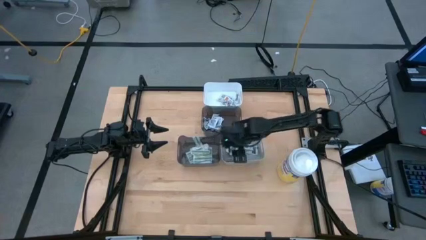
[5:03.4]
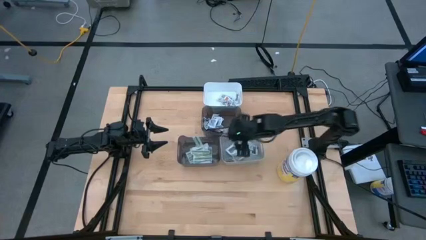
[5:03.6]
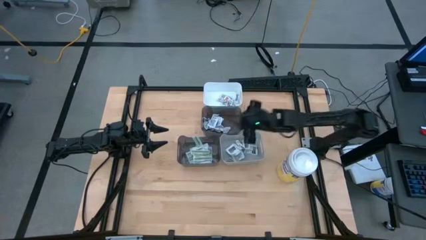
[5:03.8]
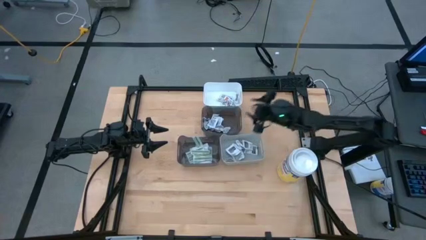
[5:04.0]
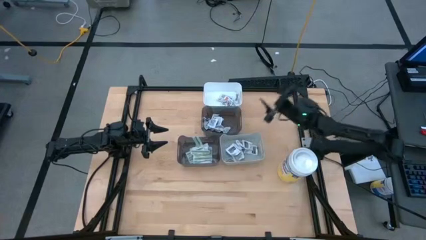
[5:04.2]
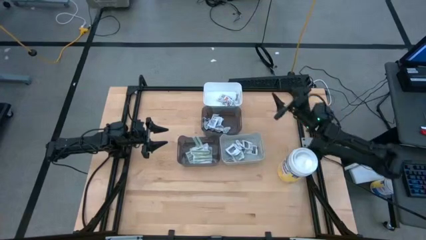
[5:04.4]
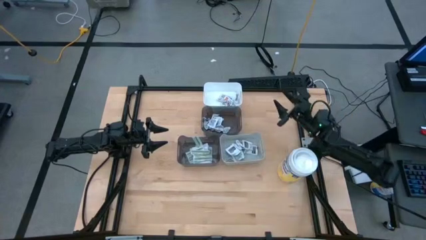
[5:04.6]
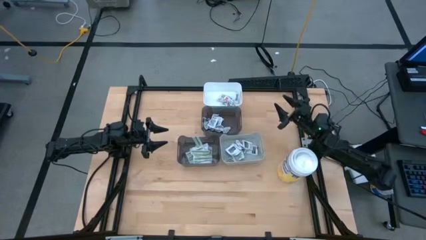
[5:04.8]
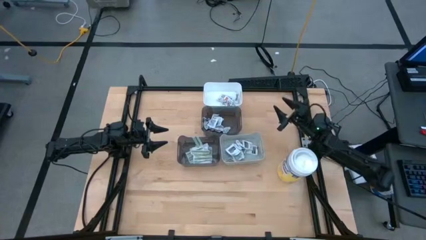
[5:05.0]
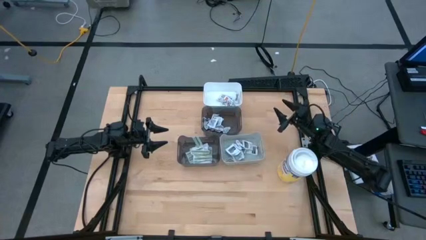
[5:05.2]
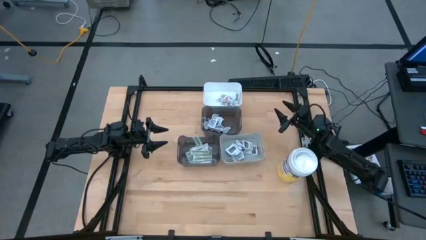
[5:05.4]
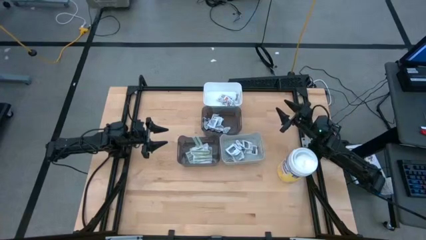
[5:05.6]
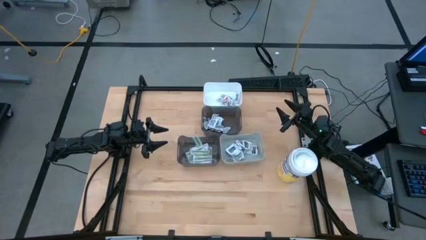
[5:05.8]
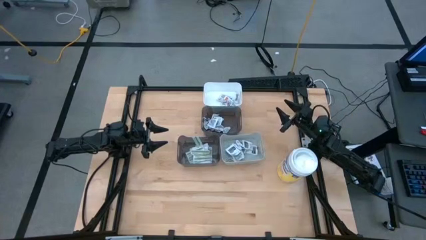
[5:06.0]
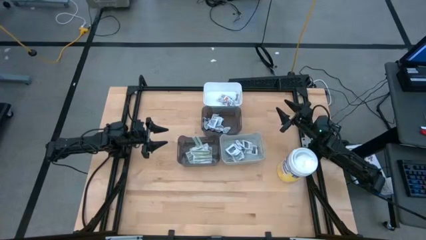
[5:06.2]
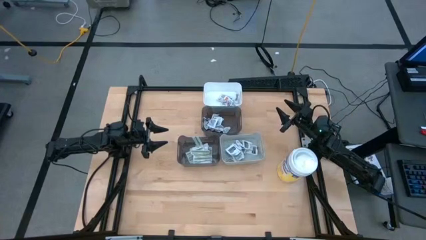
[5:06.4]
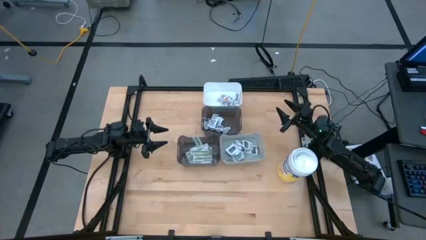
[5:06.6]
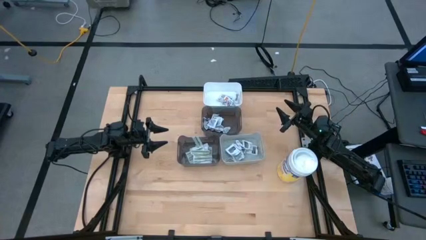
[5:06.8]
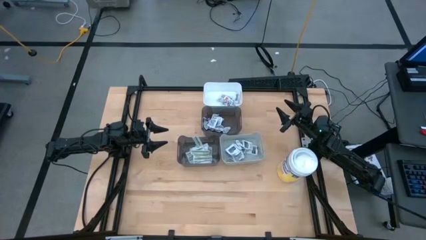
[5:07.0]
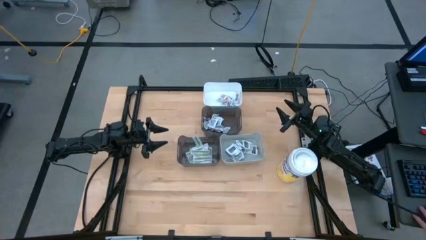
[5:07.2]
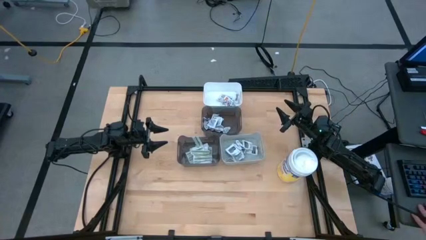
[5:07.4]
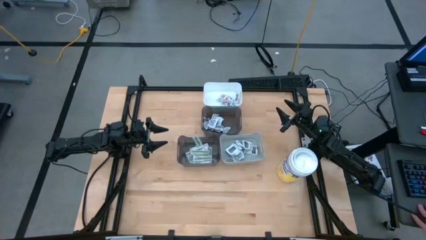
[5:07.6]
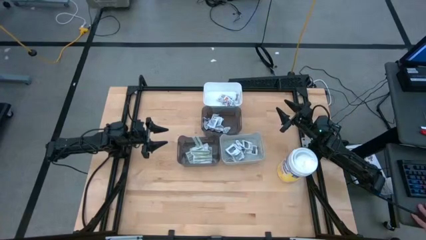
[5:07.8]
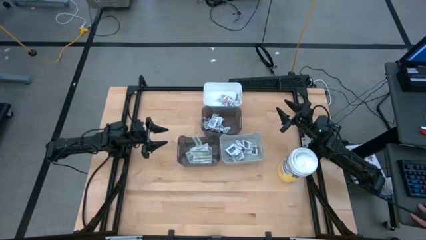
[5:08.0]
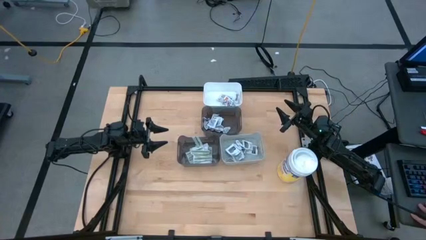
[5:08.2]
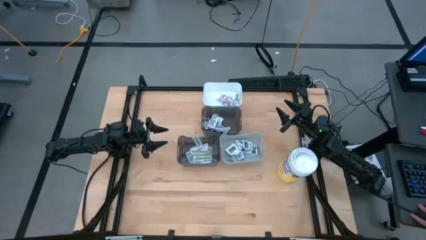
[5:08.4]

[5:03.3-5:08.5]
Task: Pick & Place First Aid Supplies
Return to Home Position

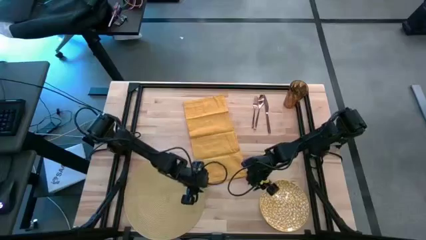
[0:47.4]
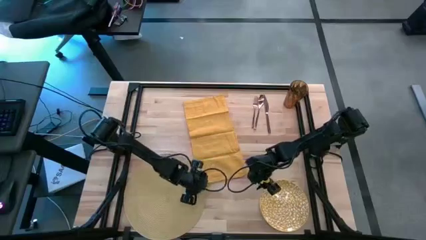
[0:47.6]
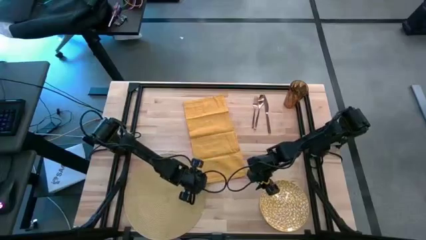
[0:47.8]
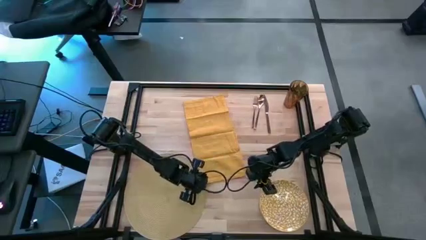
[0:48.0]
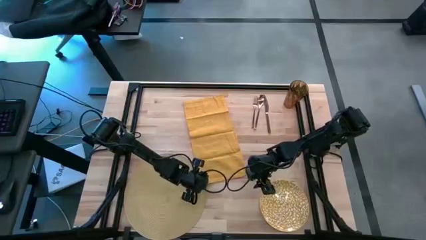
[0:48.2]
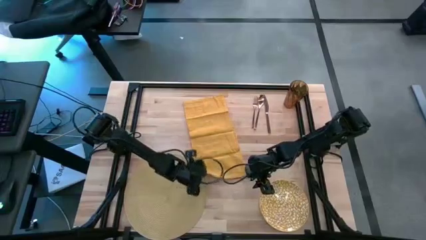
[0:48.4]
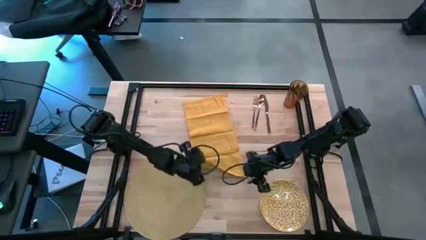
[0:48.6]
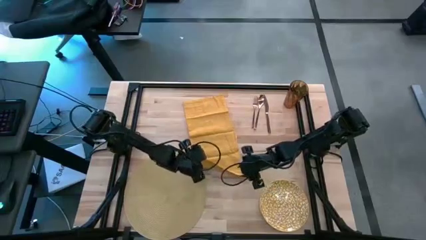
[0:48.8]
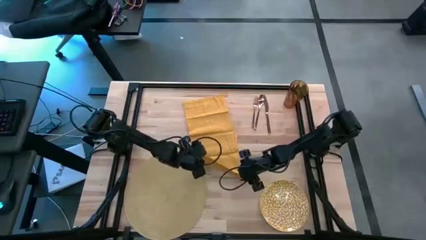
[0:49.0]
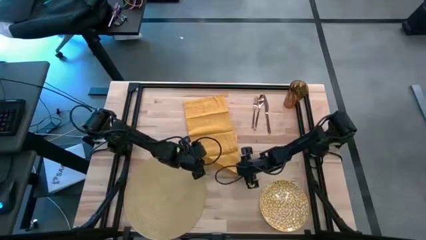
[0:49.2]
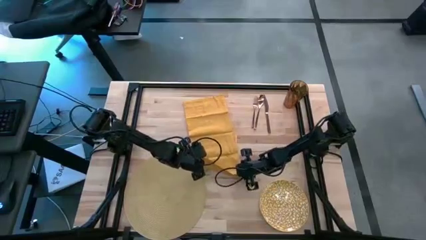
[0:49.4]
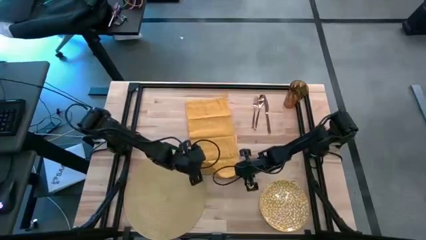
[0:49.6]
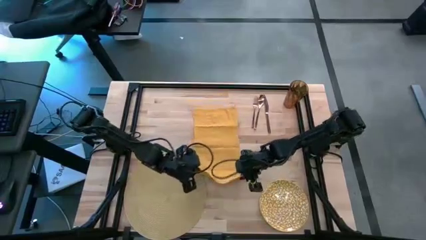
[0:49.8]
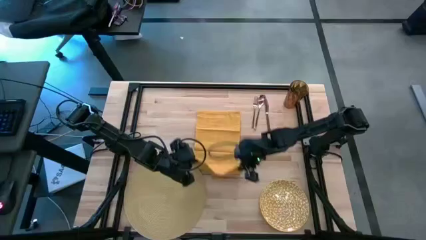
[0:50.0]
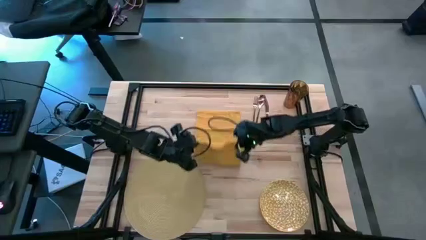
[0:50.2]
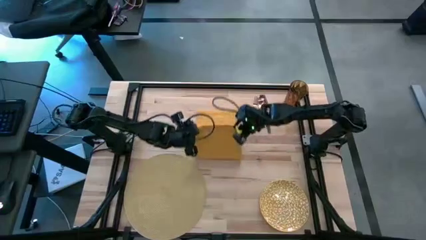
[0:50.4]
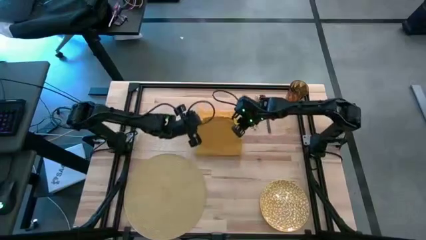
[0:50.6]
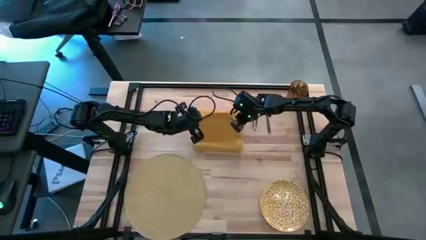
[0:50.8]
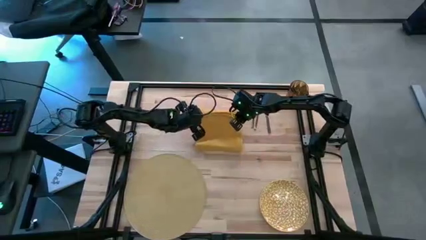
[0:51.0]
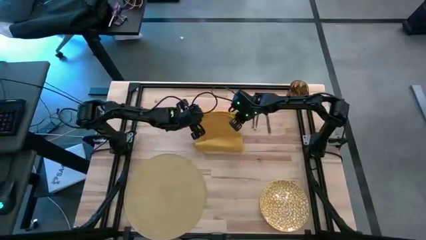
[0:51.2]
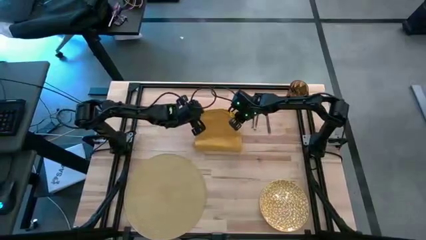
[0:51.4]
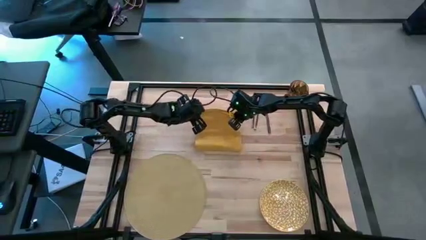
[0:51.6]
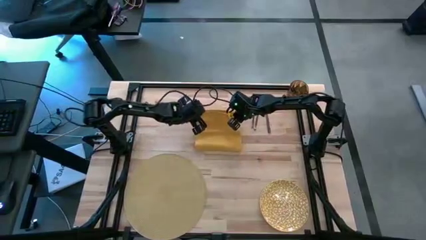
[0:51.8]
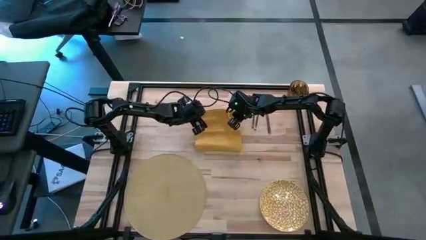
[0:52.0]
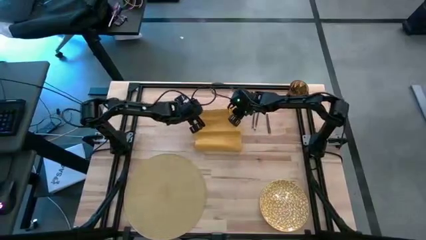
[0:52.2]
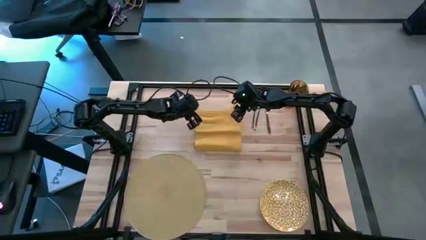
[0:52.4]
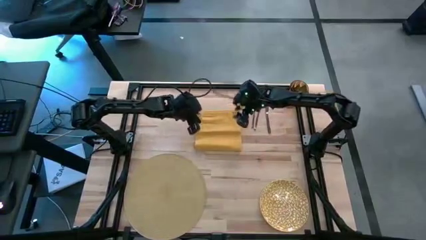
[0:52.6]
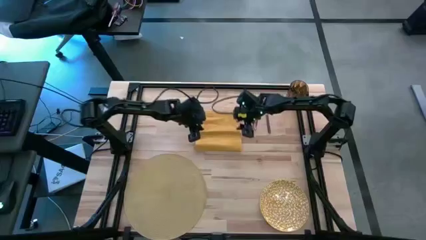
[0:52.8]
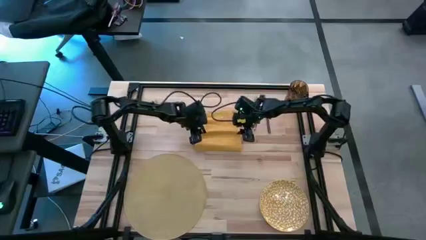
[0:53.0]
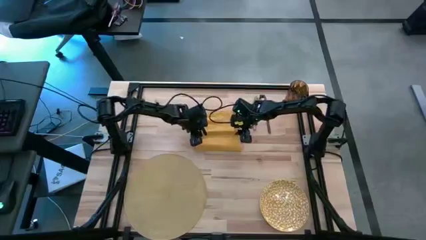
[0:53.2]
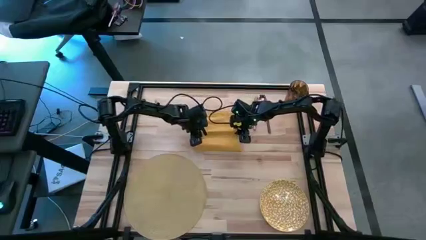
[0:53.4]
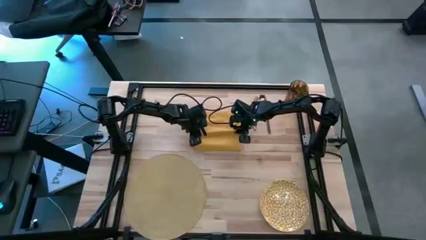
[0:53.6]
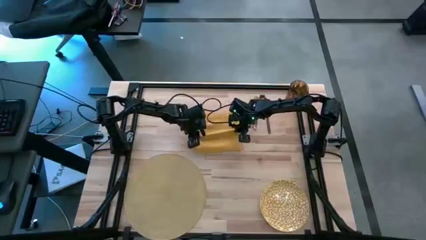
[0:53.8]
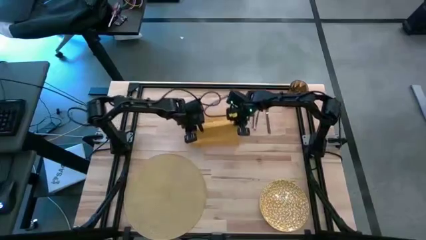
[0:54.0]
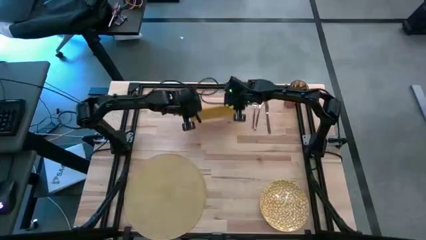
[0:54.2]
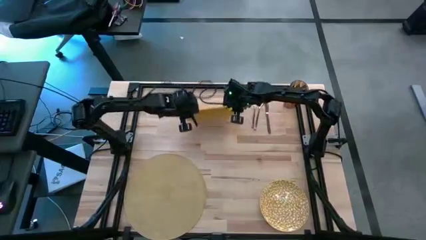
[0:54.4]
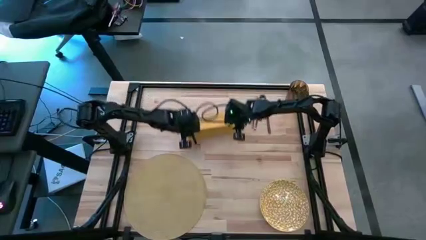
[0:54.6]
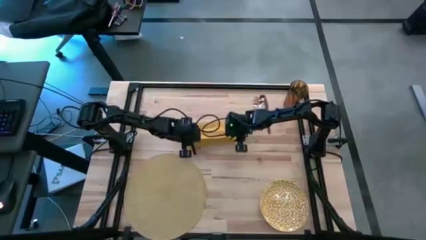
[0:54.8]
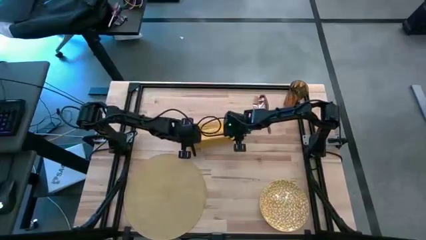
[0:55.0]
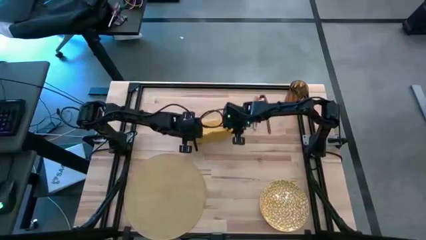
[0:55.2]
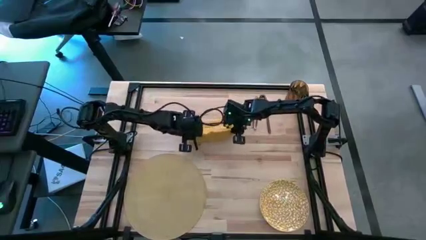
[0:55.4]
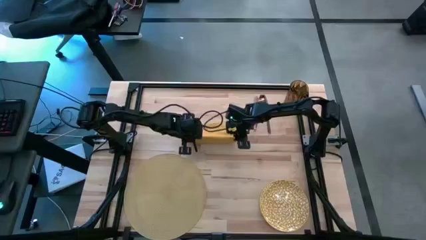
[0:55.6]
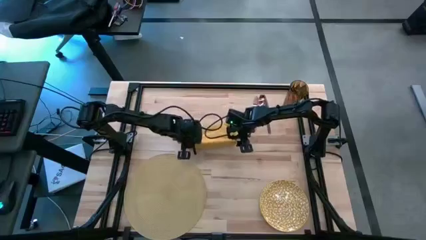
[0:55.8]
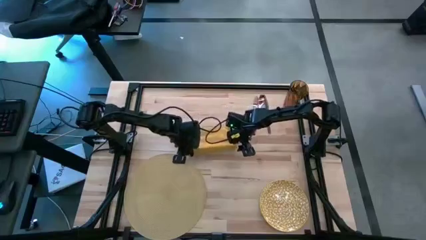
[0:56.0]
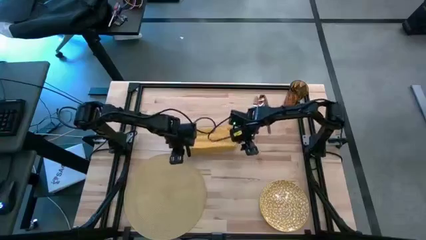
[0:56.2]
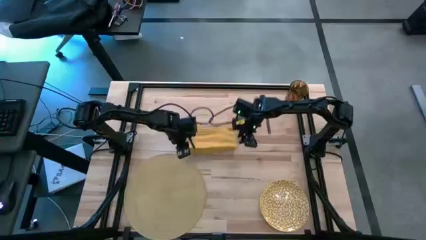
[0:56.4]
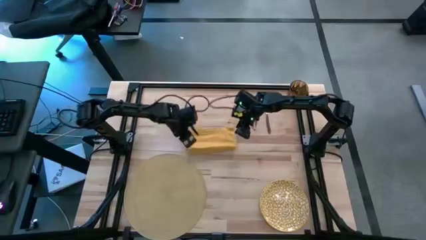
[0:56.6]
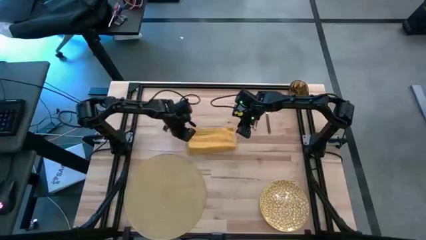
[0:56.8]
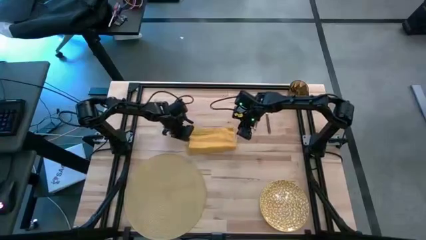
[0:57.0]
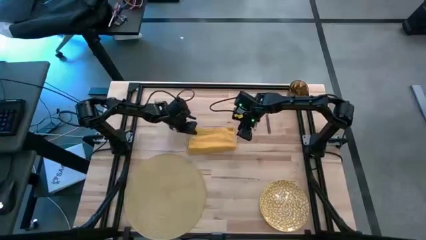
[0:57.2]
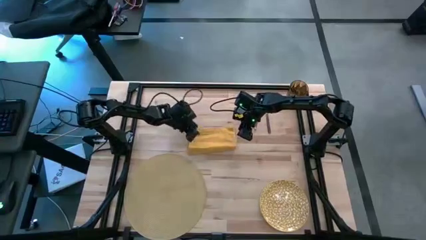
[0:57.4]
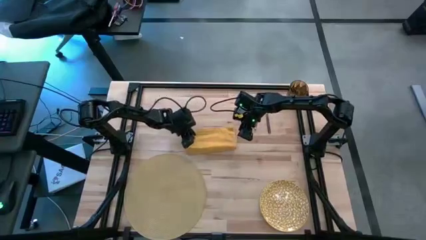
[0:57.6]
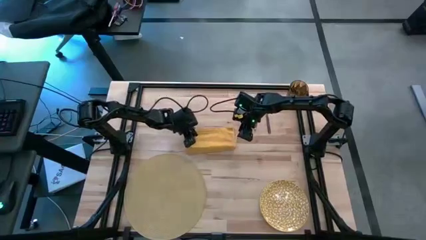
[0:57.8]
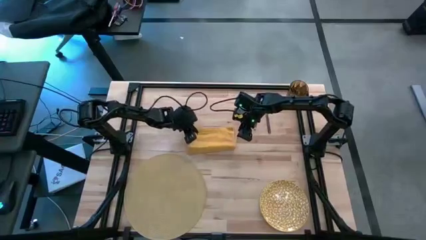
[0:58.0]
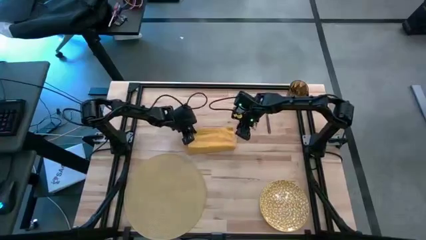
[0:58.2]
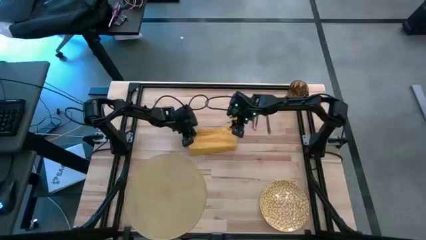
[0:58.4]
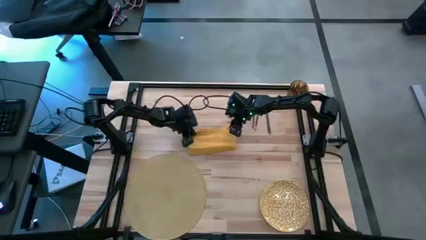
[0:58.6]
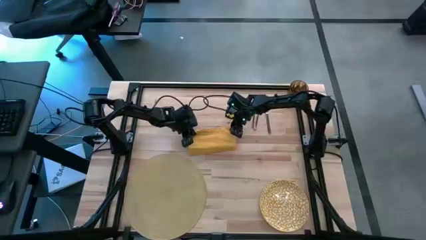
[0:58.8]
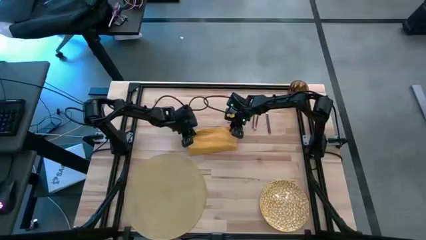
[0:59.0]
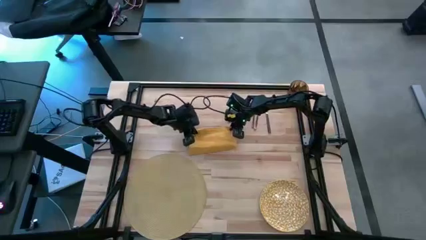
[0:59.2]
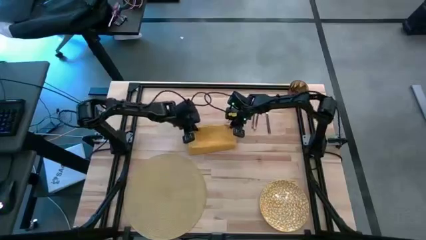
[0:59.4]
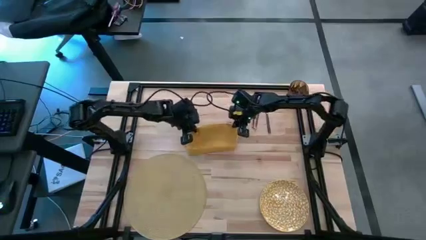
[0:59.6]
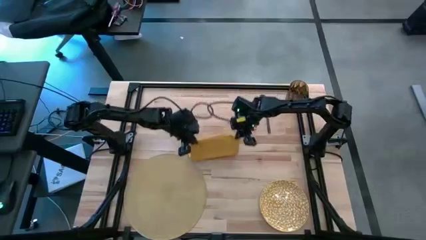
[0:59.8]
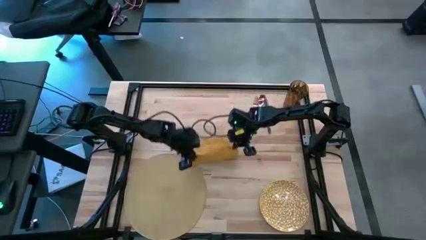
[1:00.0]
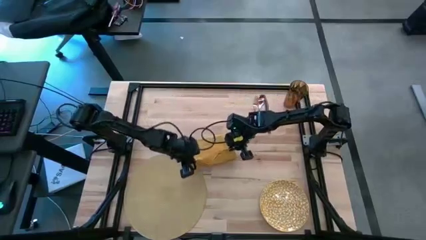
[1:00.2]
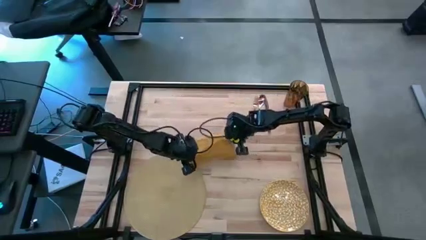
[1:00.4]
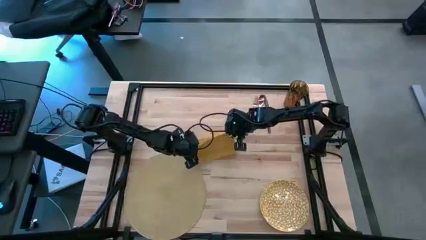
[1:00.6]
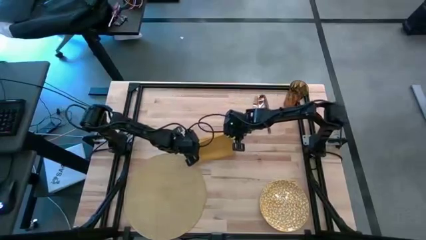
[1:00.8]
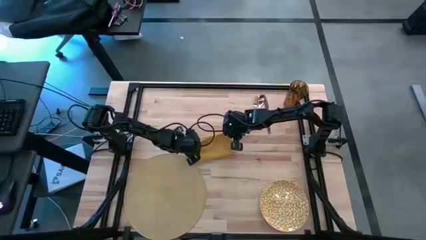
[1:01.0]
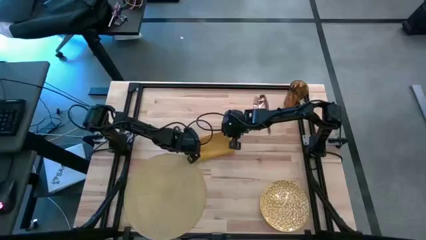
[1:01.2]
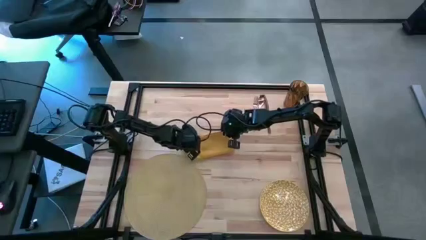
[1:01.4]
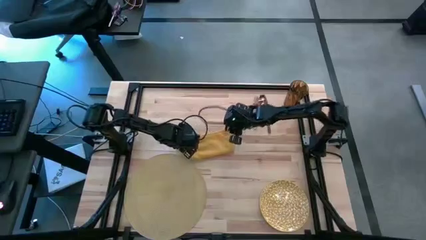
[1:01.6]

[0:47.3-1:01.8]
Task: Set table place
Fold the yellow napkin
